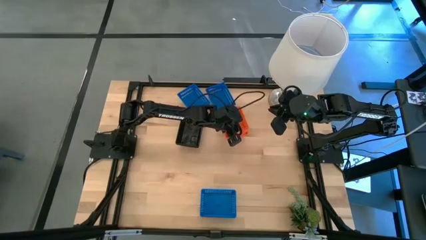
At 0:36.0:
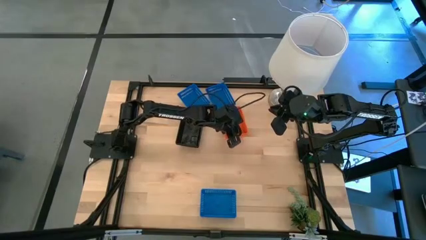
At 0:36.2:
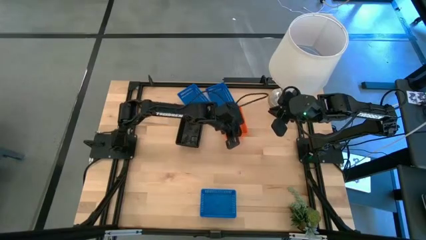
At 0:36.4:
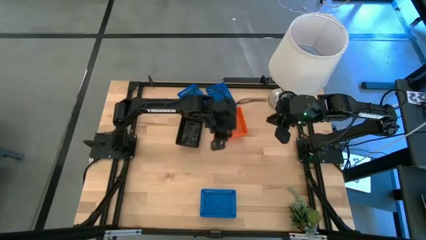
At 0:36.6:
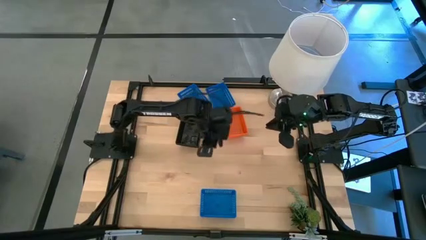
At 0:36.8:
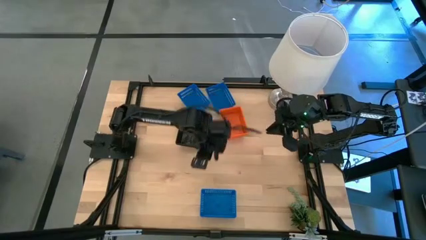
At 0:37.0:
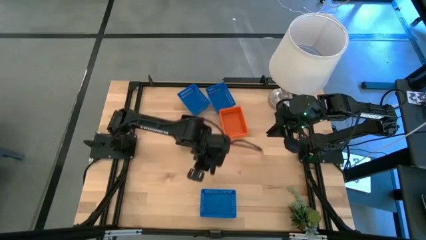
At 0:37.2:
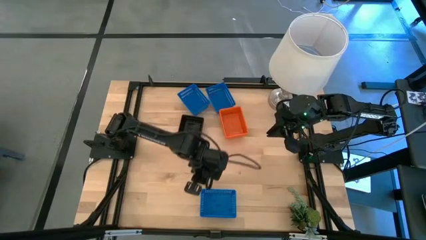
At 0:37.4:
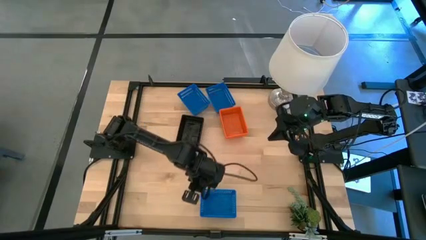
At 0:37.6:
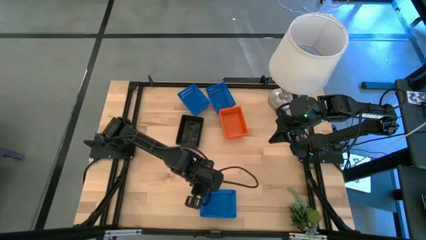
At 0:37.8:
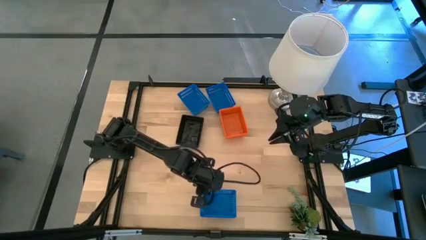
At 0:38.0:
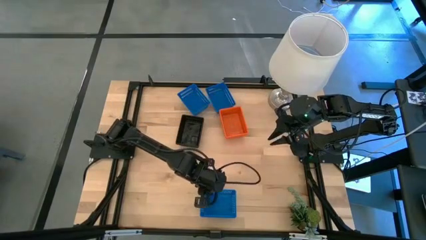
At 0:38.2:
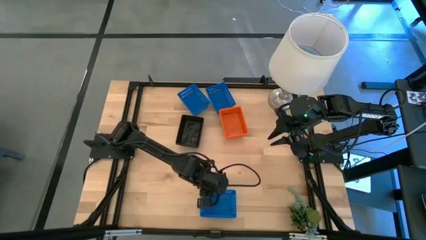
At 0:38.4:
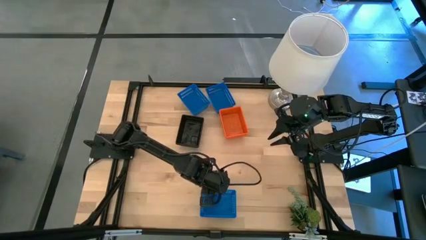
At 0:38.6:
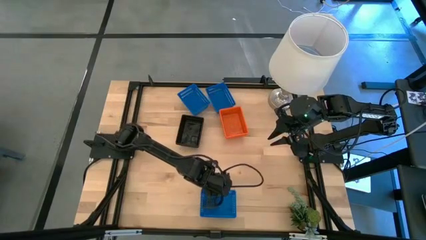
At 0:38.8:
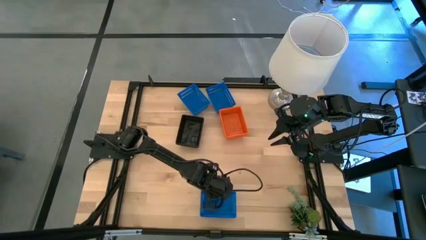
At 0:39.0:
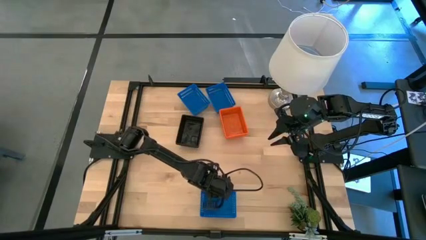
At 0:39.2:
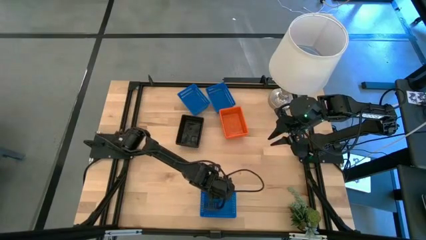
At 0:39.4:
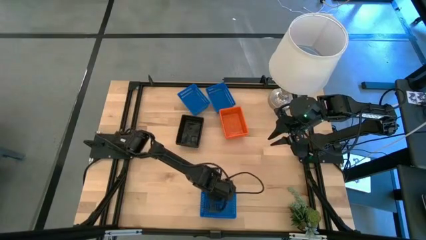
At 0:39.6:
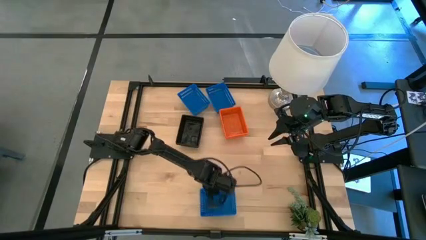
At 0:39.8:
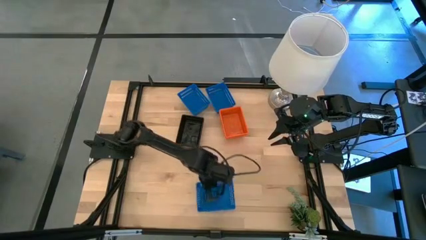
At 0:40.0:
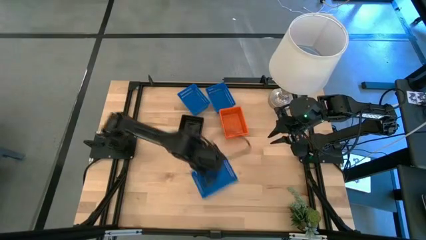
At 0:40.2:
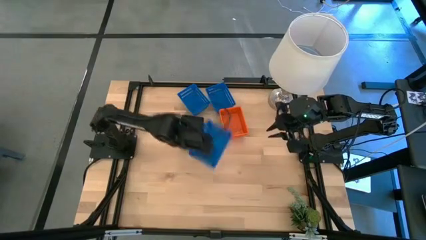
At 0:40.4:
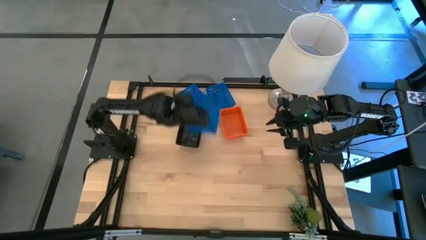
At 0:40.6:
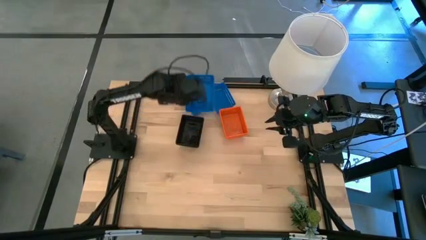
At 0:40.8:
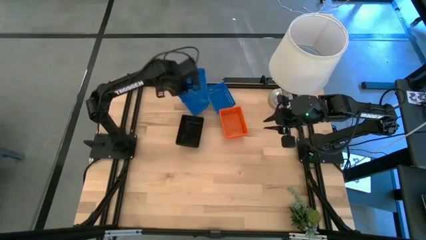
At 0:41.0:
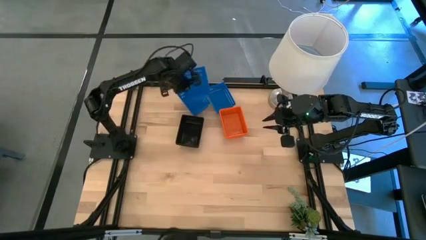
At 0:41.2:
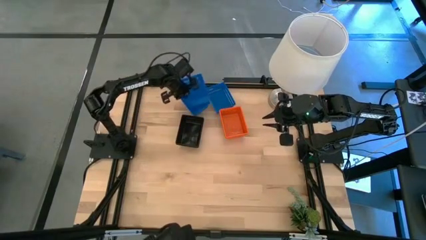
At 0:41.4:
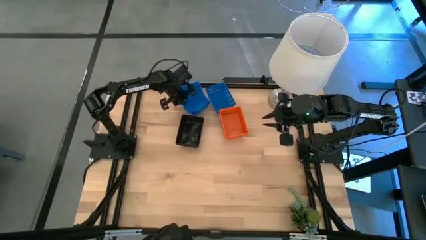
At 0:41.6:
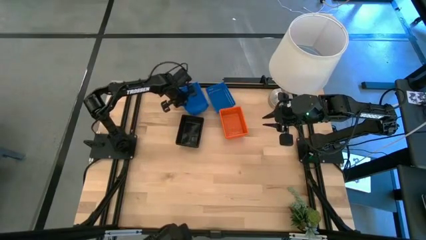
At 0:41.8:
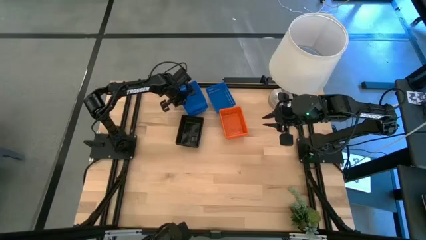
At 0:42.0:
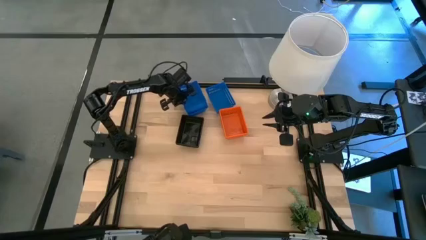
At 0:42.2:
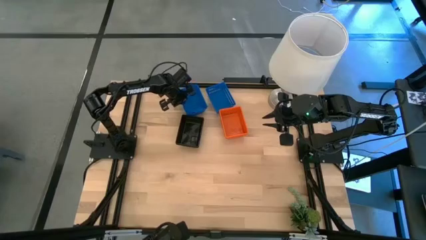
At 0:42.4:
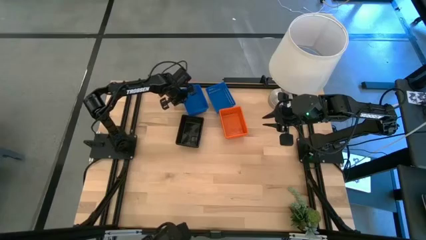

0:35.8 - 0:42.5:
Stack the bottom right blue basket bin on top of the left blue basket bin

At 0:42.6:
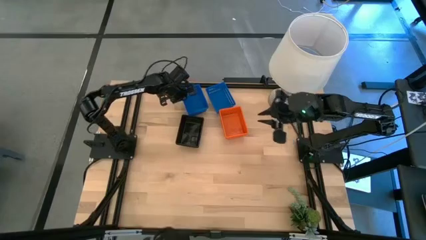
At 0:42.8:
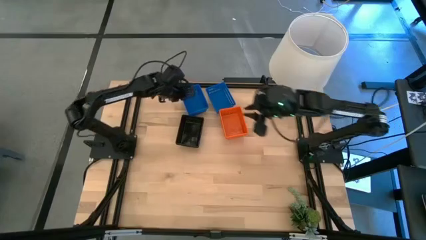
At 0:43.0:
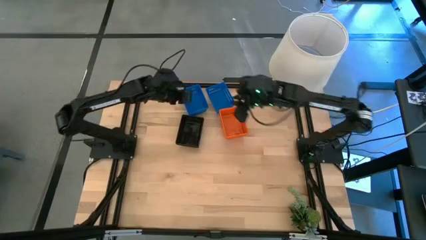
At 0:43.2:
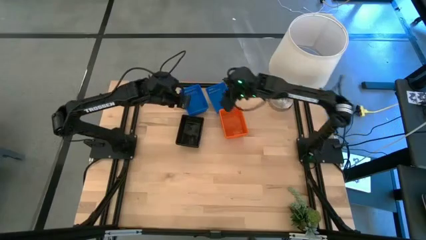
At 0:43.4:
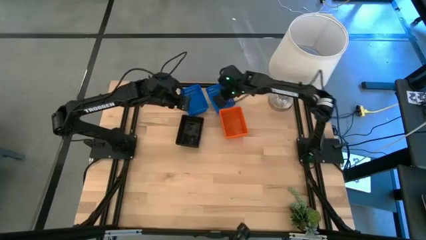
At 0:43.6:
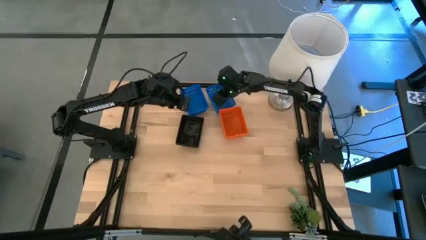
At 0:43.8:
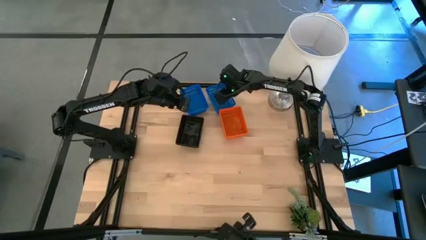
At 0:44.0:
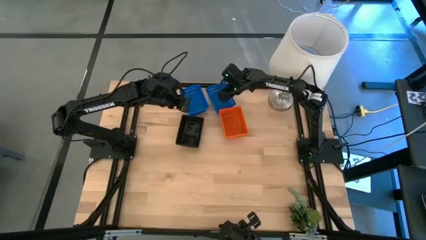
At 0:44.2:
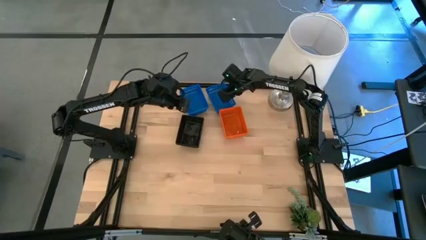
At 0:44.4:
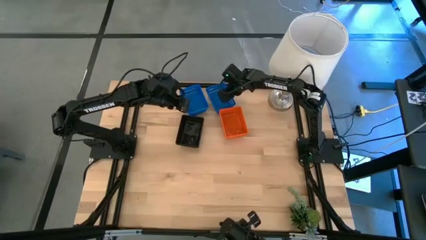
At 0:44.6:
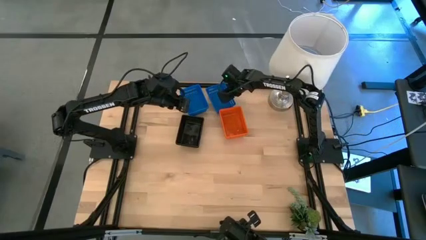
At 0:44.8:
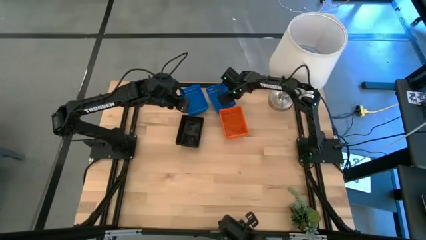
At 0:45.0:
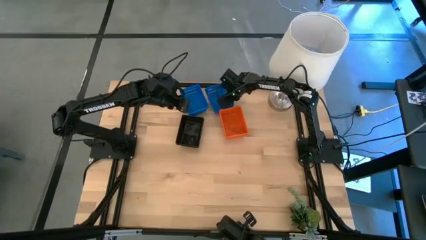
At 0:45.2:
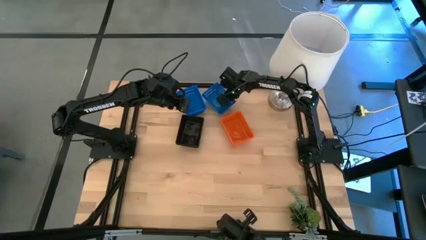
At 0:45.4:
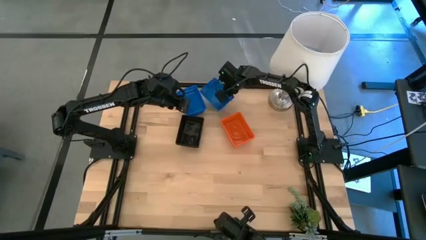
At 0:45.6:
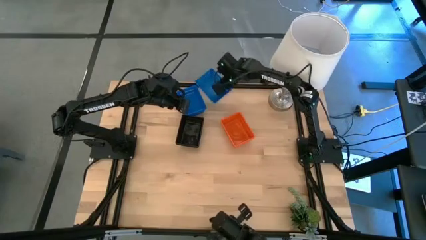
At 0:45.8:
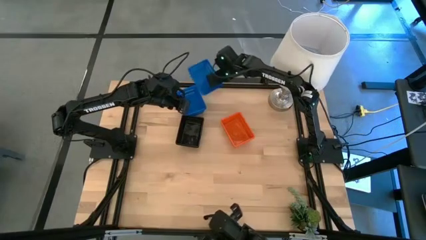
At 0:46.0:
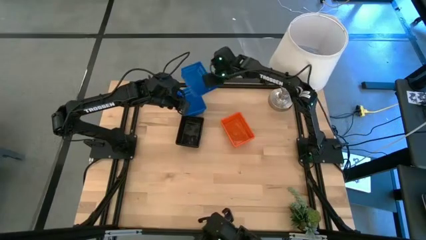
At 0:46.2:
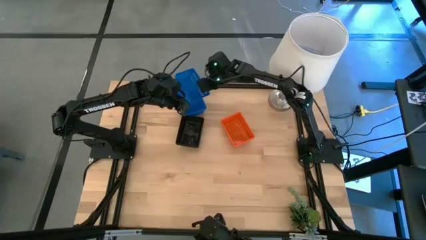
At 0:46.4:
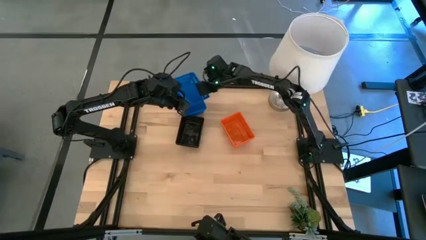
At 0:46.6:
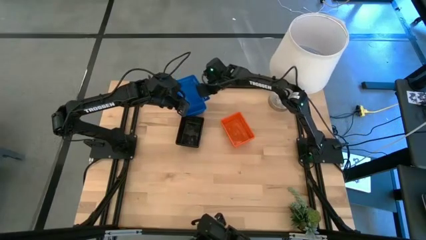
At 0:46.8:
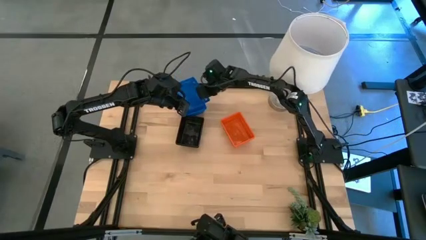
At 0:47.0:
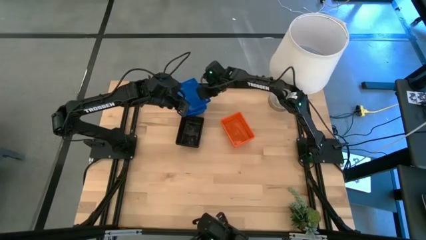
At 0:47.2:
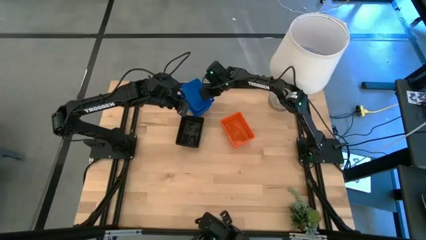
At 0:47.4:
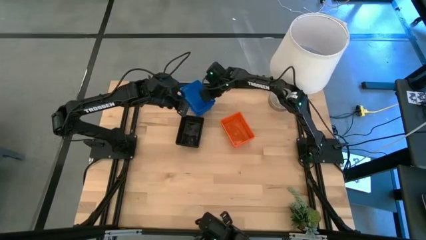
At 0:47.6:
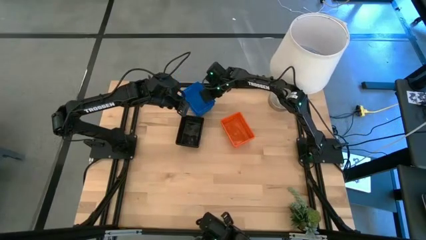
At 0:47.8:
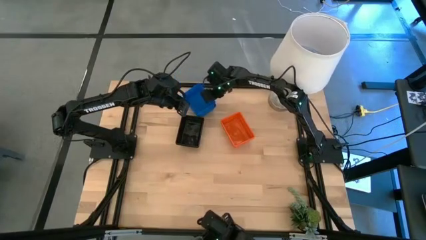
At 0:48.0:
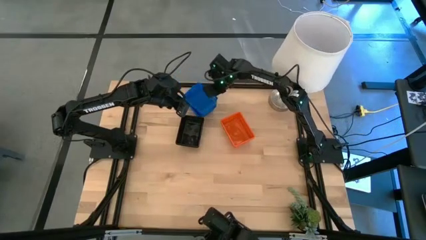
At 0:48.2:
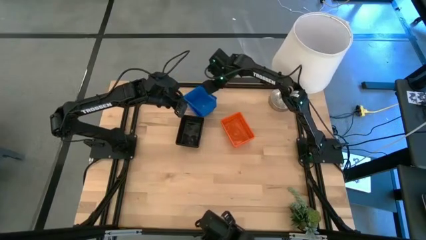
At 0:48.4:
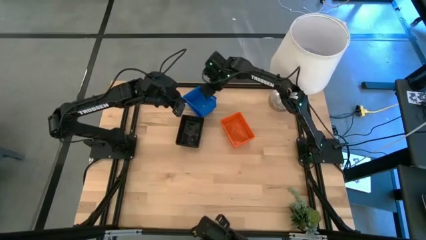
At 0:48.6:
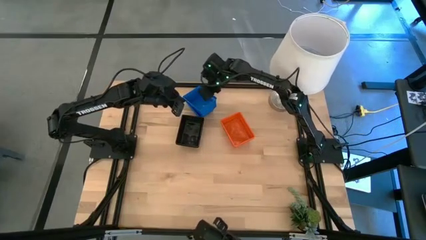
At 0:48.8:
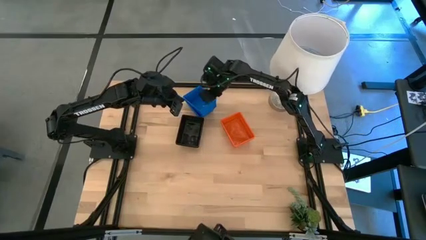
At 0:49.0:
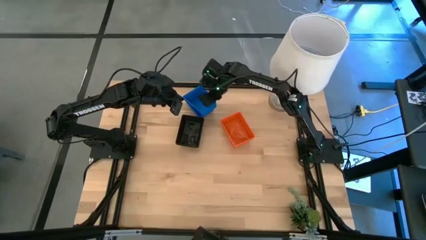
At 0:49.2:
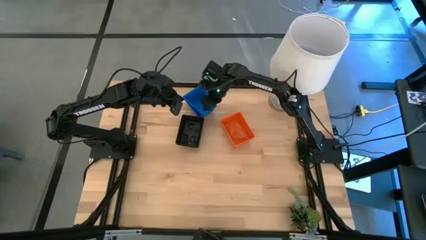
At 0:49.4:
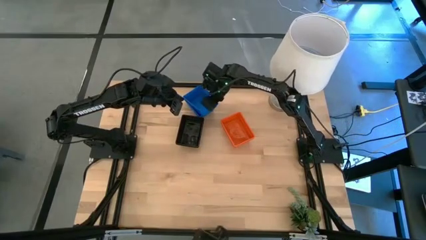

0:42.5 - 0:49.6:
Stack the right blue basket bin on top of the left blue basket bin

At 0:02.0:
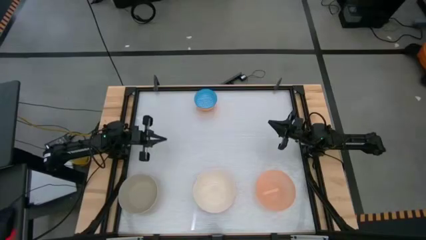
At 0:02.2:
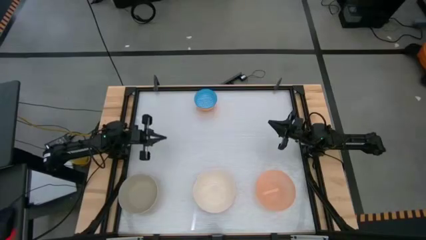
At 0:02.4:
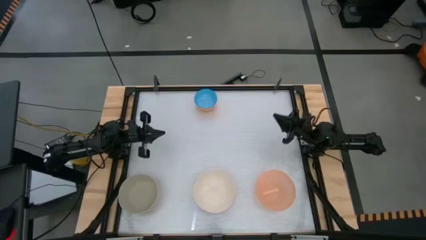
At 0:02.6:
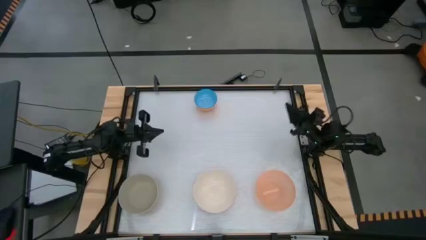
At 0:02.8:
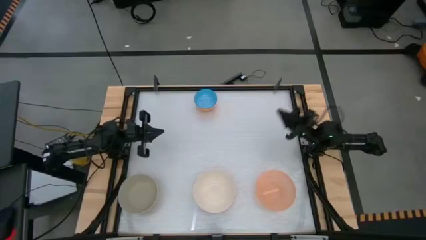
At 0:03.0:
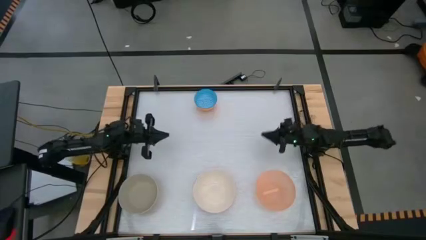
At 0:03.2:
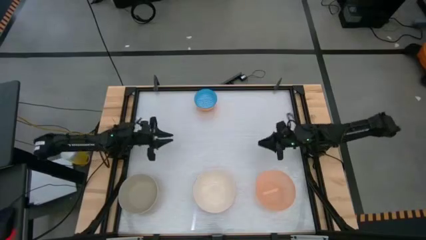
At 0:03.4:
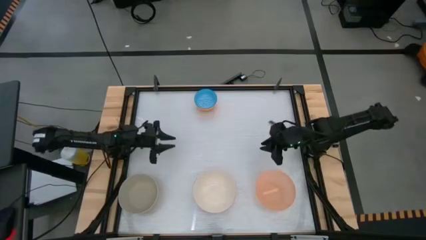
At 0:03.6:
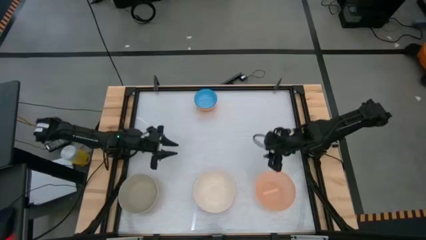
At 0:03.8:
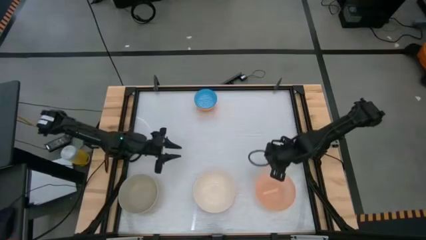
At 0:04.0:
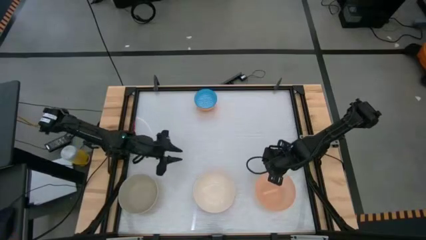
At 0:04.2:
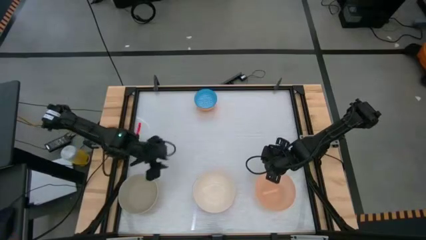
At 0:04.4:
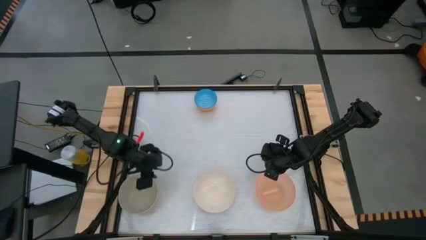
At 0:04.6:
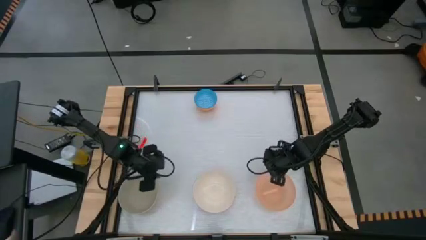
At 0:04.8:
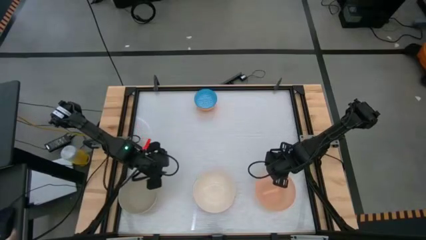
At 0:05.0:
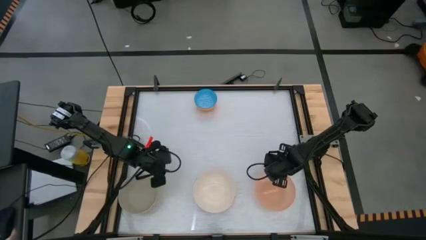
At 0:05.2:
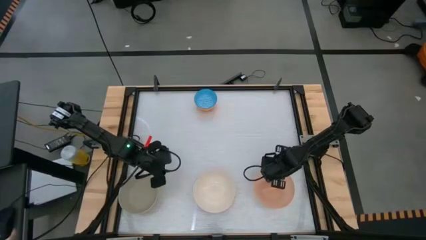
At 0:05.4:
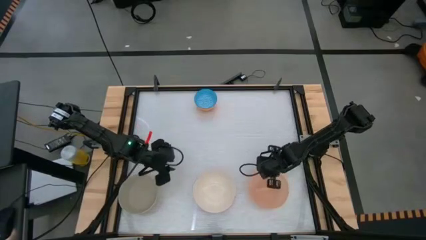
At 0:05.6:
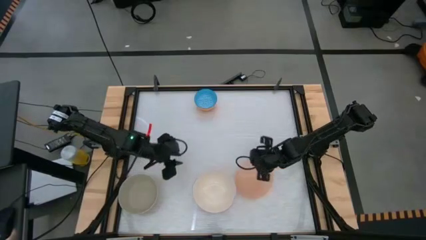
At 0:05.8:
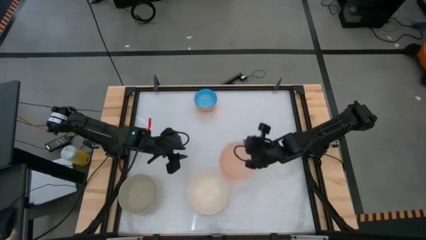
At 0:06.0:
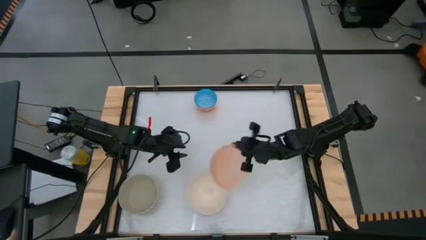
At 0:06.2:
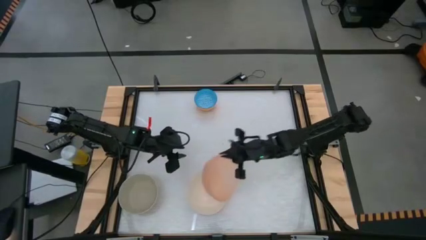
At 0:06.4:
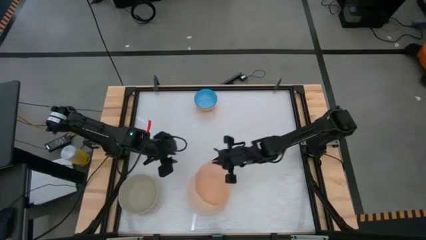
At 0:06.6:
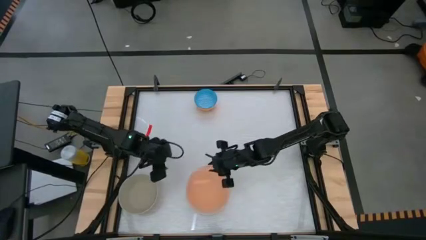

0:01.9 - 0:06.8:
Stack the orange bowl on top of the white bowl
